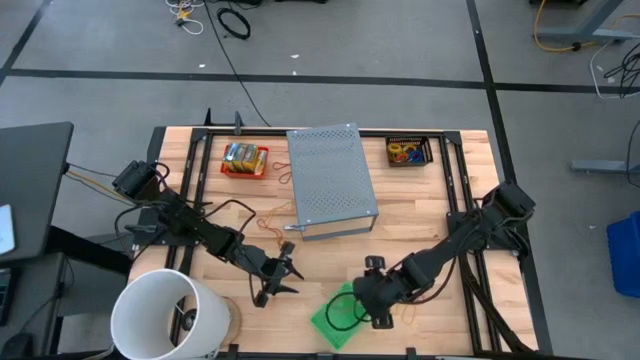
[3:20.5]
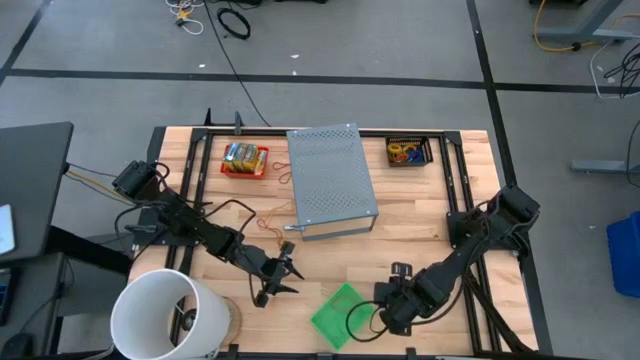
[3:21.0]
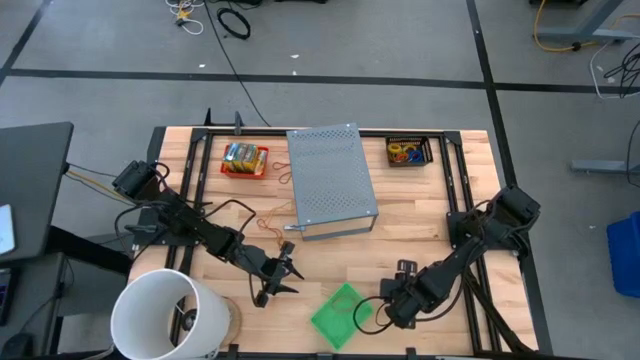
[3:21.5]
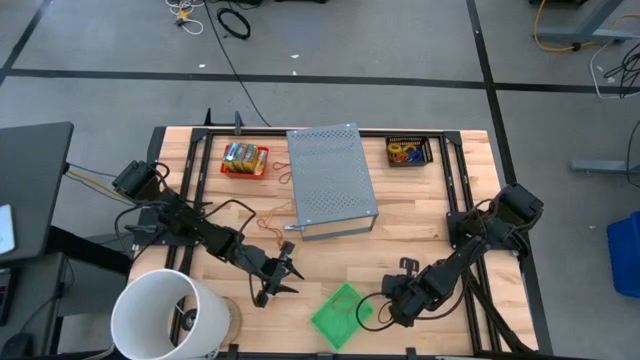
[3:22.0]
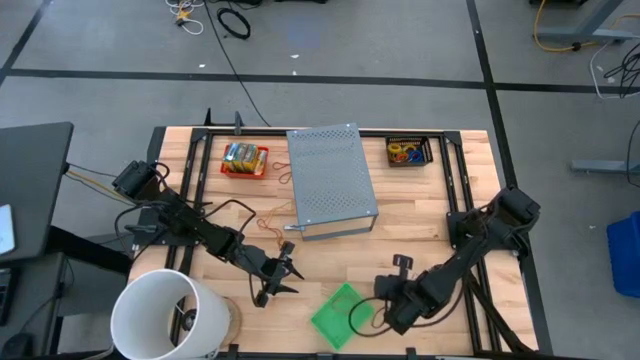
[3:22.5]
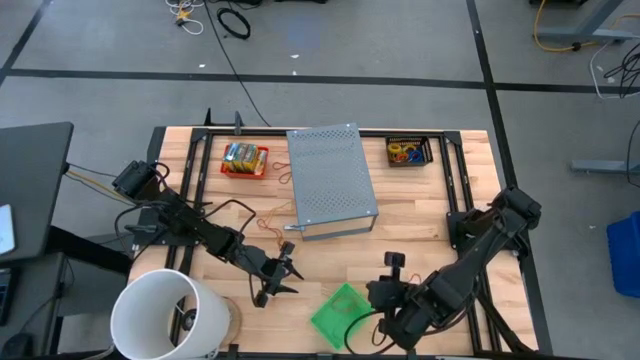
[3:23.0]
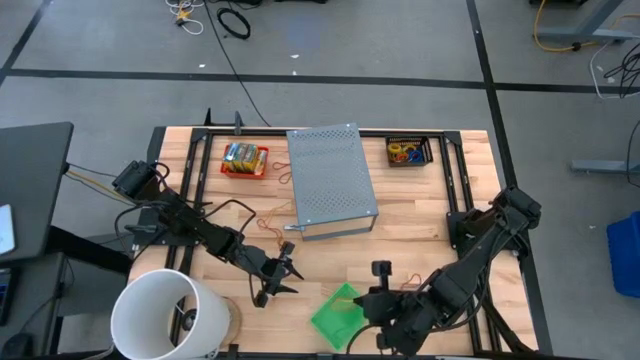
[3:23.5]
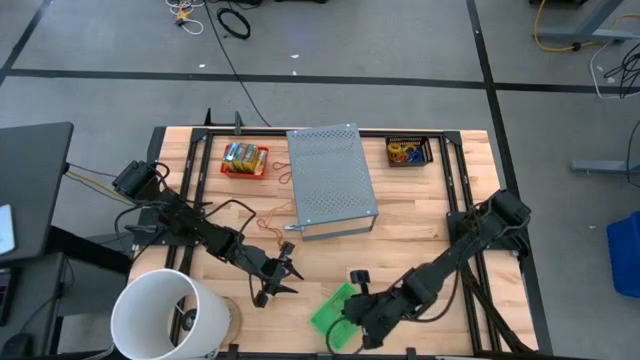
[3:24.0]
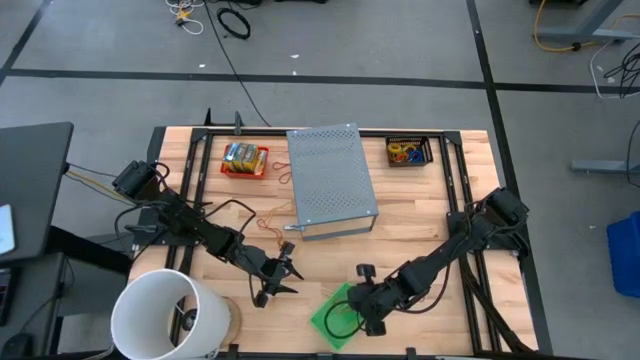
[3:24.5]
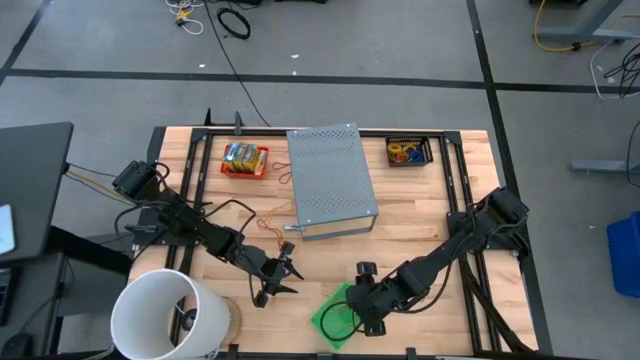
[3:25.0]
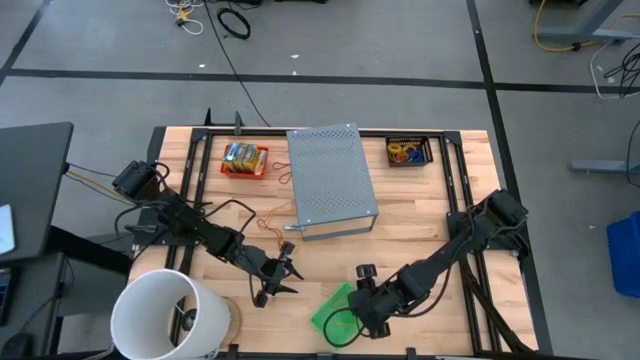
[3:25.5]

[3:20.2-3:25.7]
Task: Pick & Place Office Desk Supplies
Put the yellow rubber band into the green basket

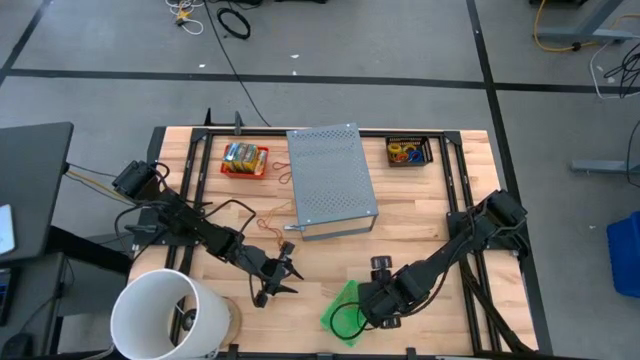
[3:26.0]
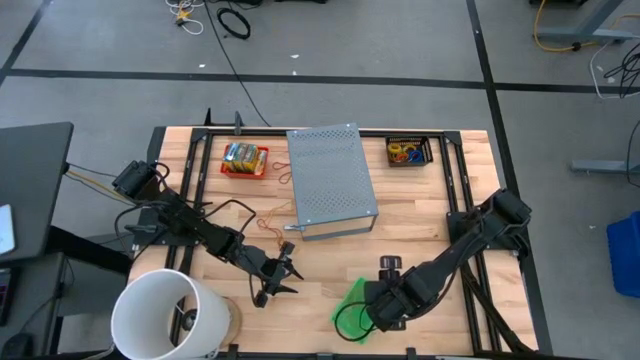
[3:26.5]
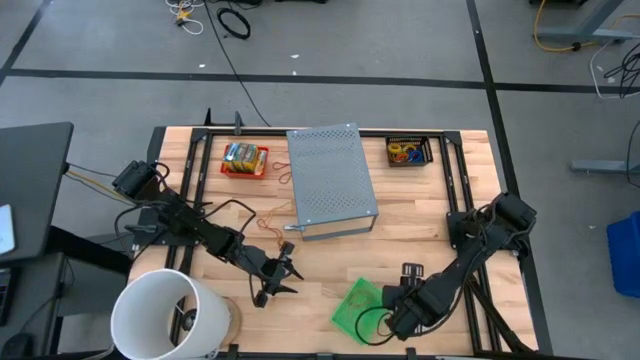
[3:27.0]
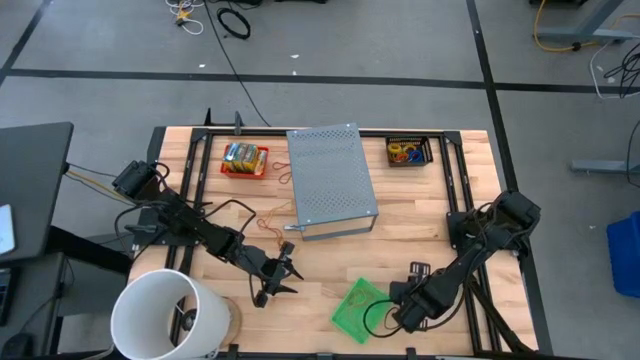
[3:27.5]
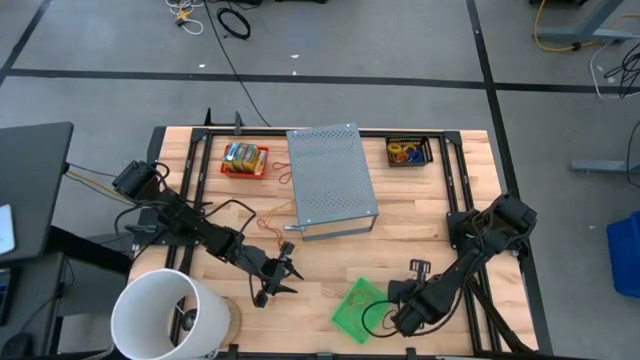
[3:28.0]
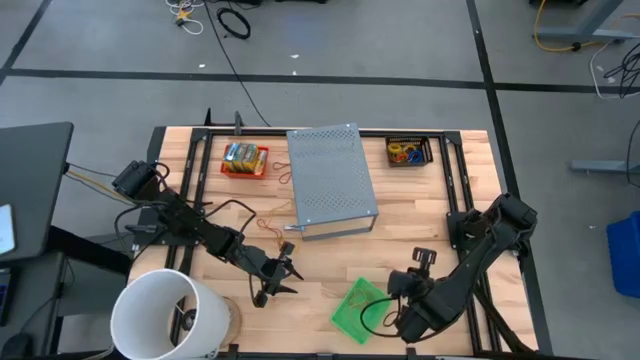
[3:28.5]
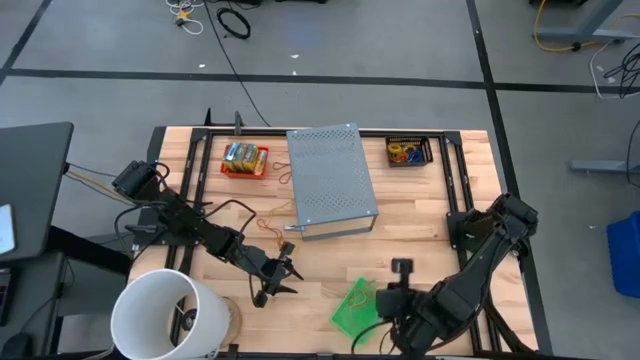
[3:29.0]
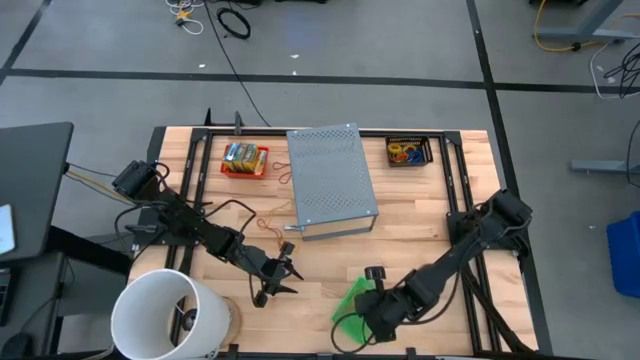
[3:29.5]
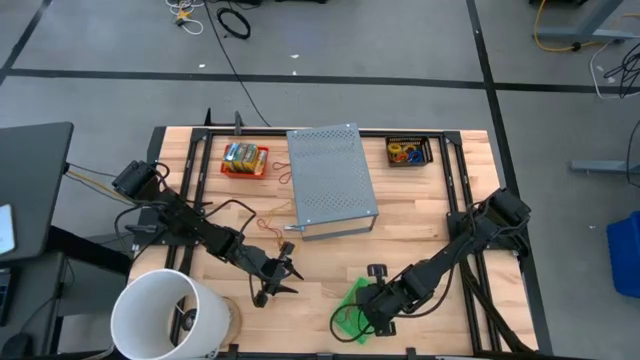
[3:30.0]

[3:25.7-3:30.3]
Put the red rubber band into the green basket

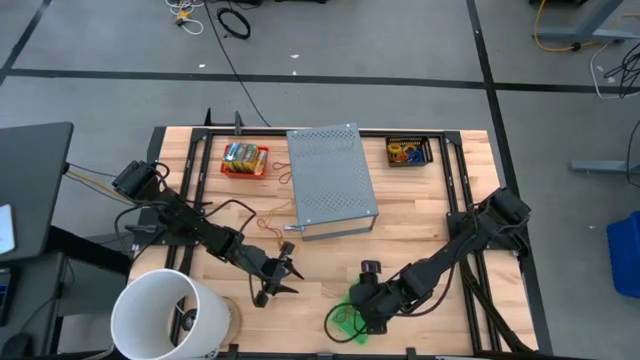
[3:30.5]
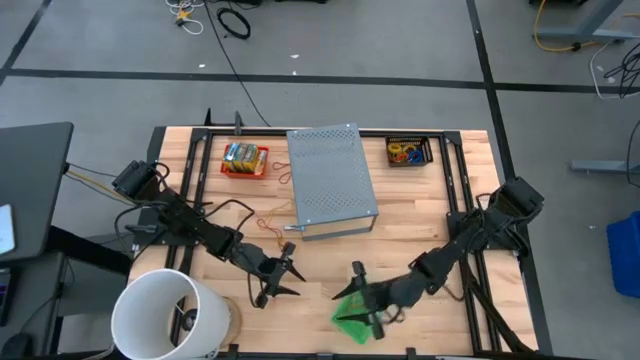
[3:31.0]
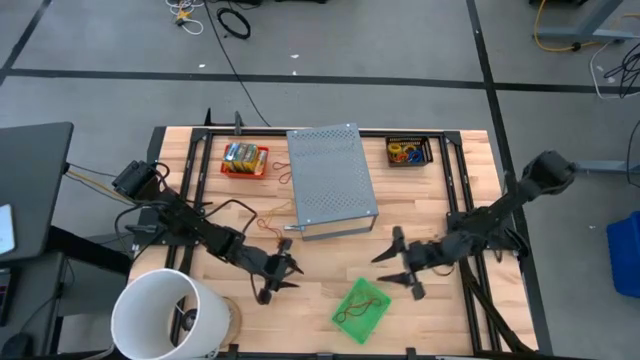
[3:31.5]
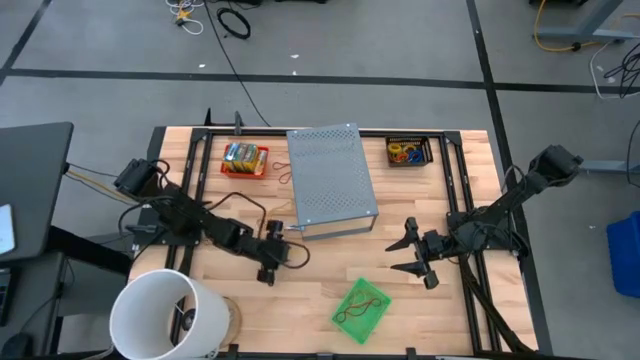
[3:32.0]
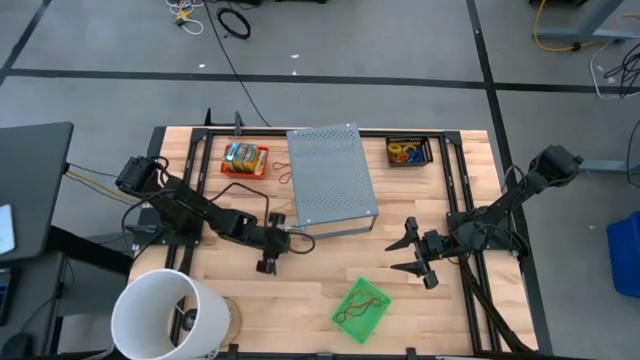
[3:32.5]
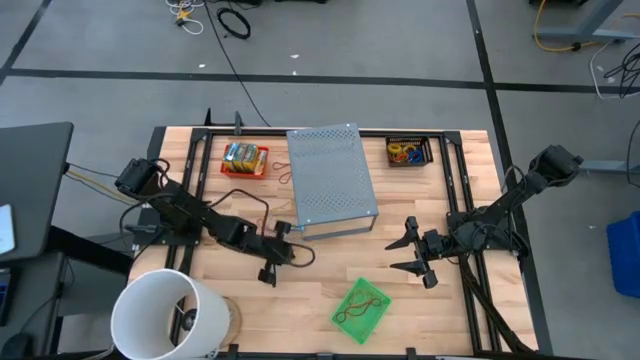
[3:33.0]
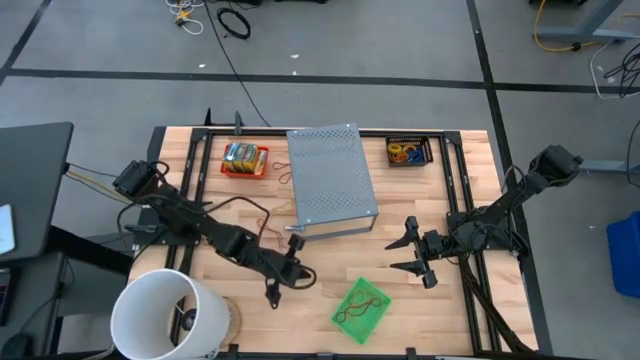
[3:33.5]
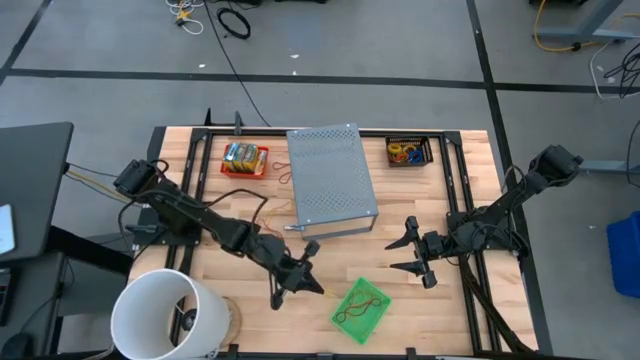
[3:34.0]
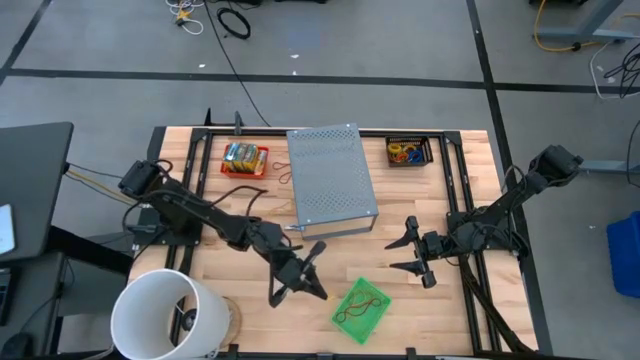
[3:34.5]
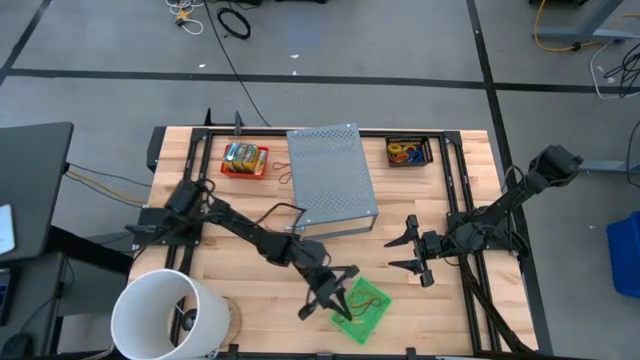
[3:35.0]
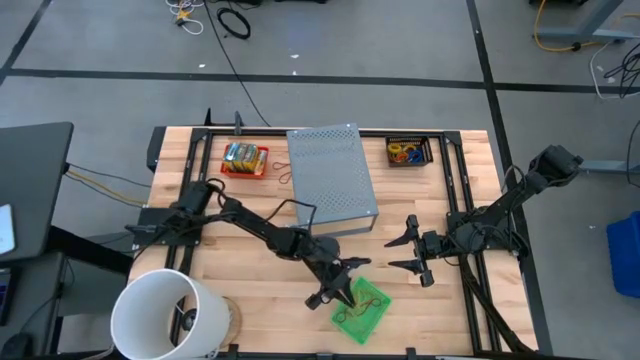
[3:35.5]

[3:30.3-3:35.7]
Put the yellow rubber band into the green basket

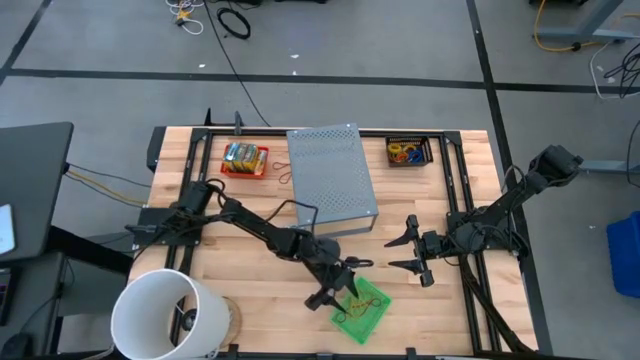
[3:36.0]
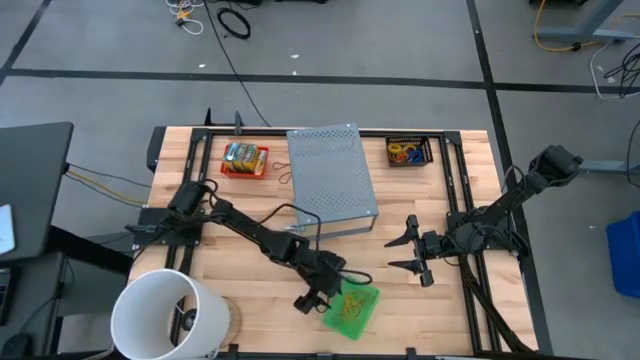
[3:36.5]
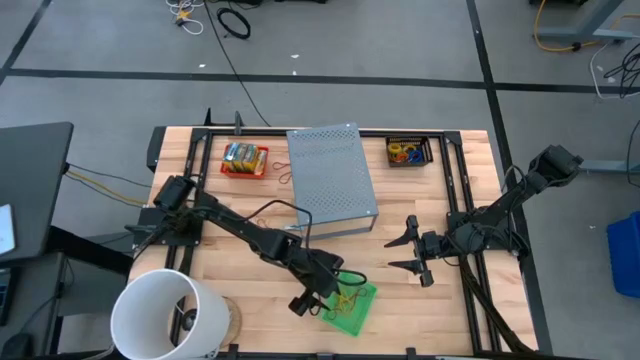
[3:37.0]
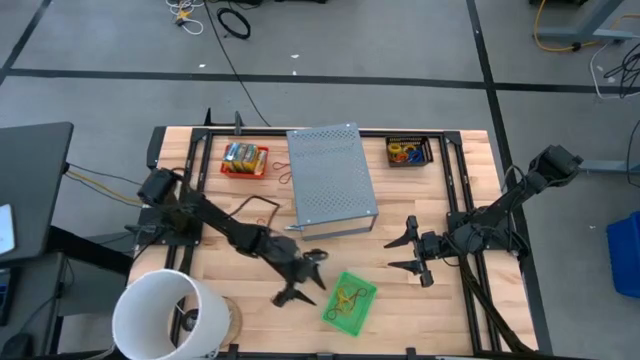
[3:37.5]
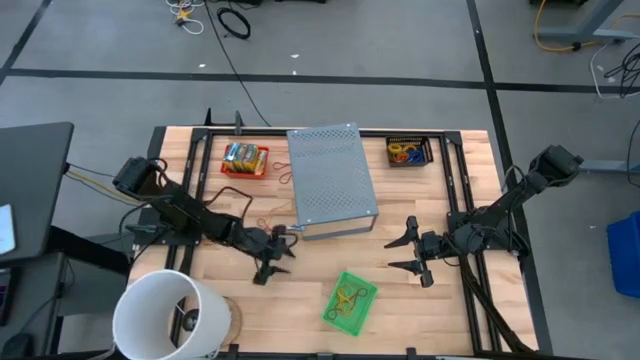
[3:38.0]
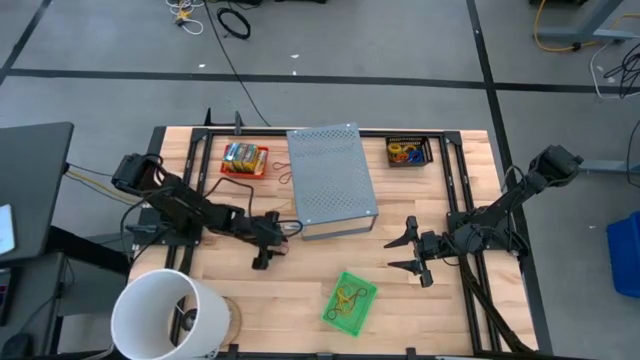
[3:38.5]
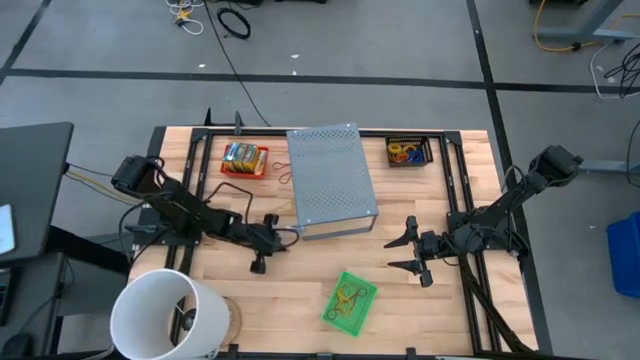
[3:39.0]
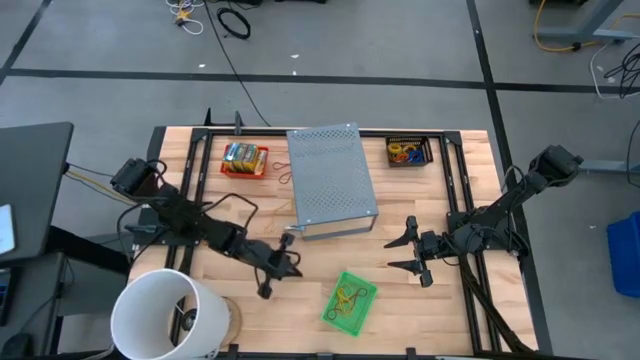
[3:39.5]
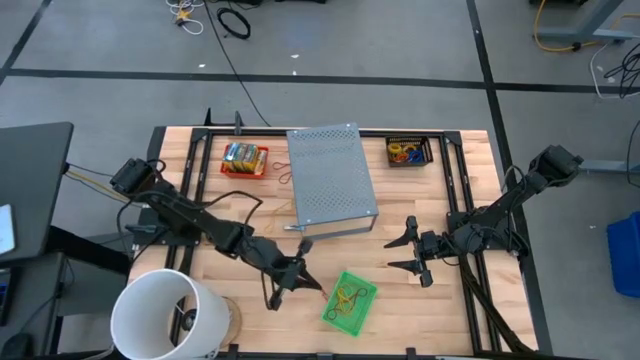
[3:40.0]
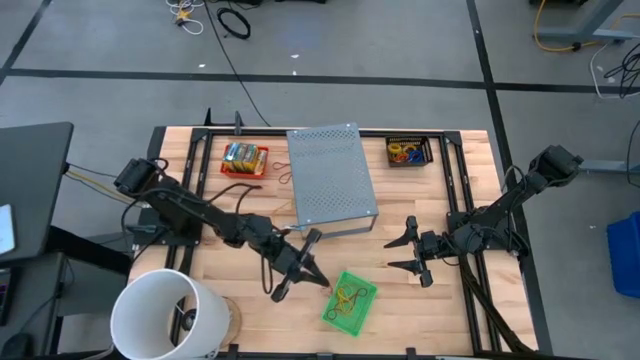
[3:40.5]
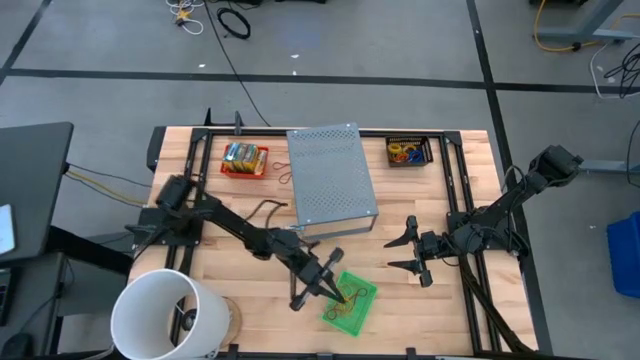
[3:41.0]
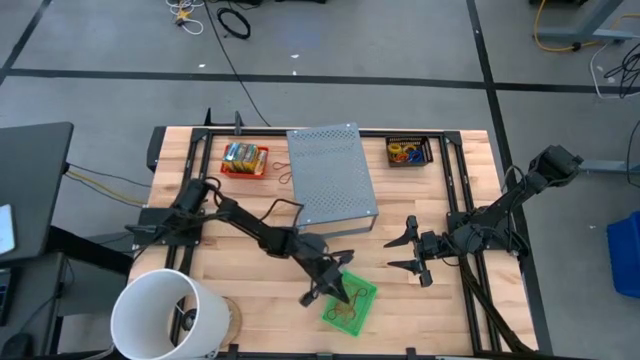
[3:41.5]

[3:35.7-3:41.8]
Put the red rubber band into the green basket
